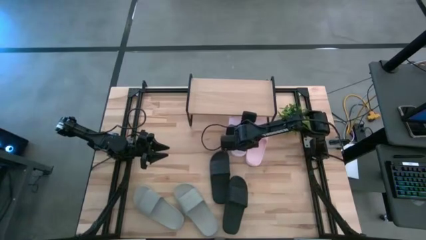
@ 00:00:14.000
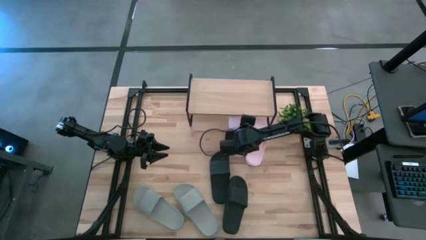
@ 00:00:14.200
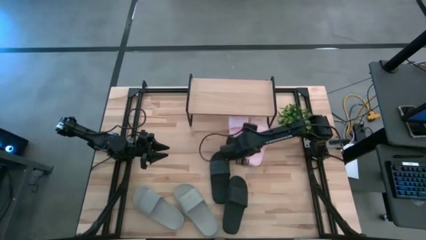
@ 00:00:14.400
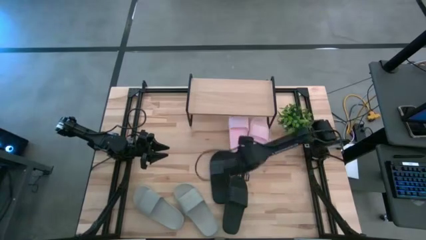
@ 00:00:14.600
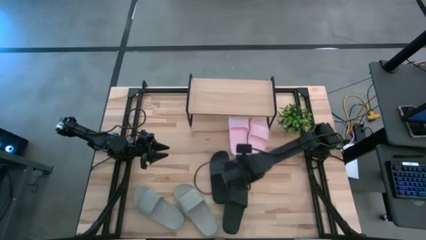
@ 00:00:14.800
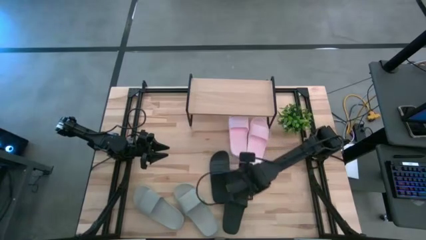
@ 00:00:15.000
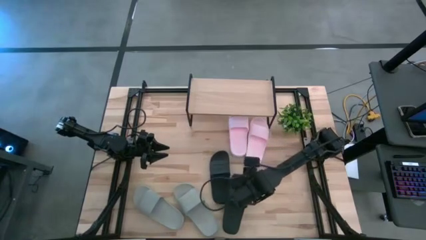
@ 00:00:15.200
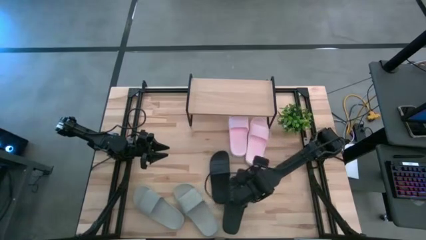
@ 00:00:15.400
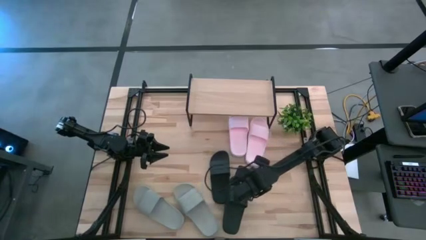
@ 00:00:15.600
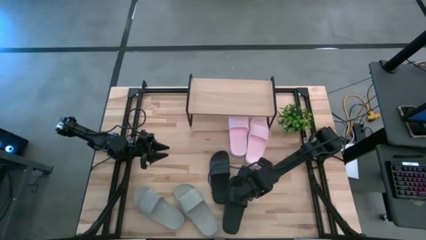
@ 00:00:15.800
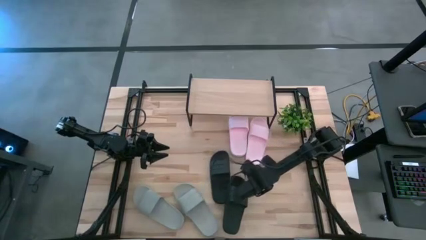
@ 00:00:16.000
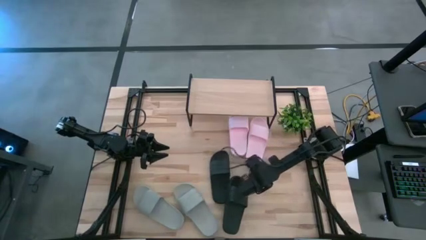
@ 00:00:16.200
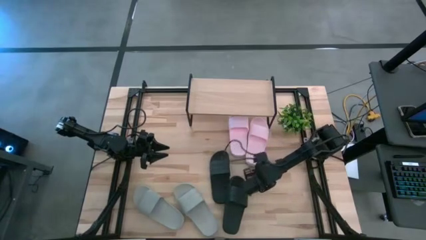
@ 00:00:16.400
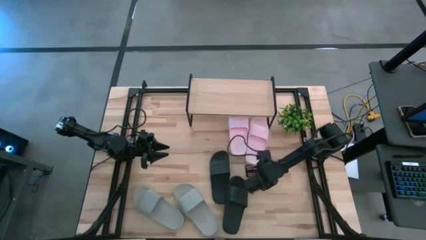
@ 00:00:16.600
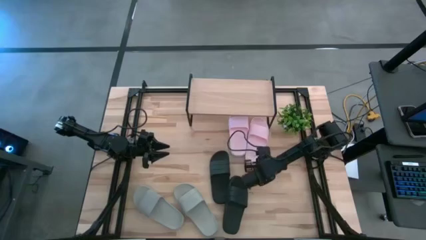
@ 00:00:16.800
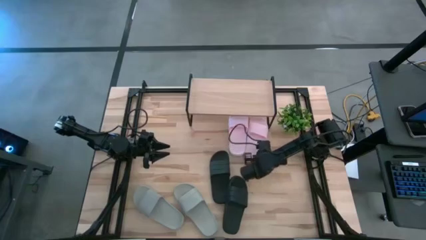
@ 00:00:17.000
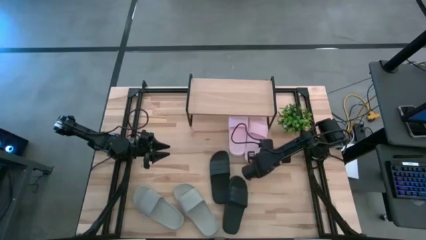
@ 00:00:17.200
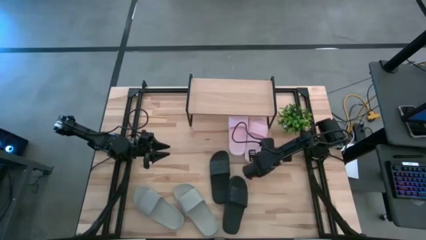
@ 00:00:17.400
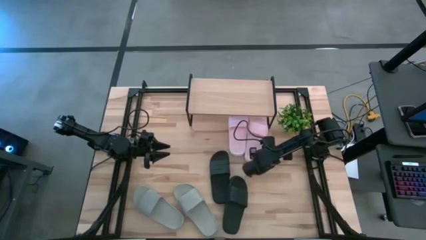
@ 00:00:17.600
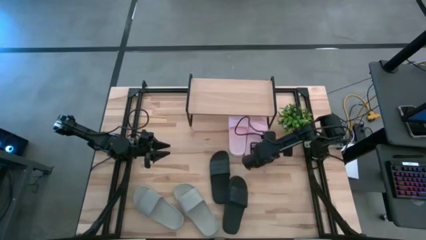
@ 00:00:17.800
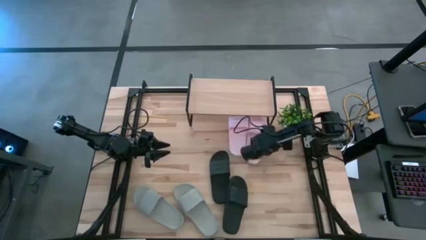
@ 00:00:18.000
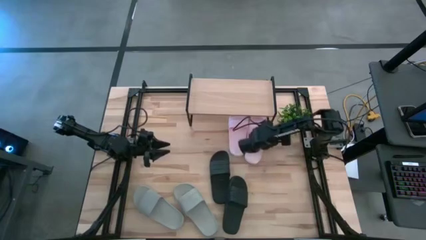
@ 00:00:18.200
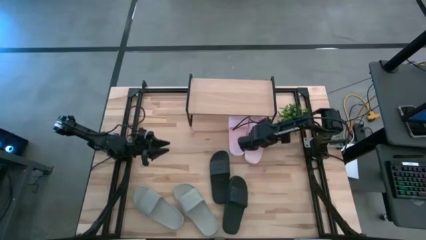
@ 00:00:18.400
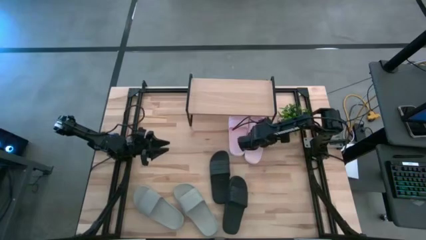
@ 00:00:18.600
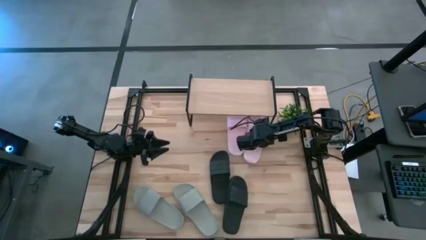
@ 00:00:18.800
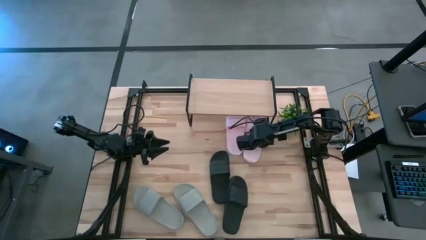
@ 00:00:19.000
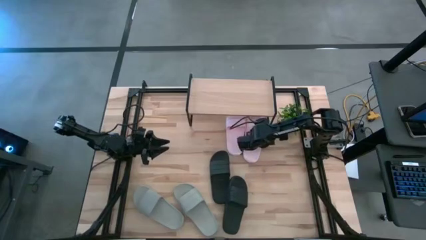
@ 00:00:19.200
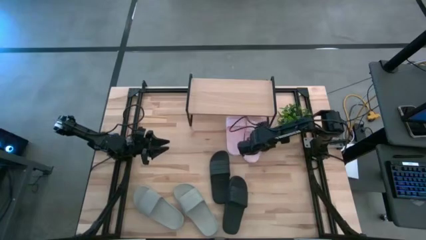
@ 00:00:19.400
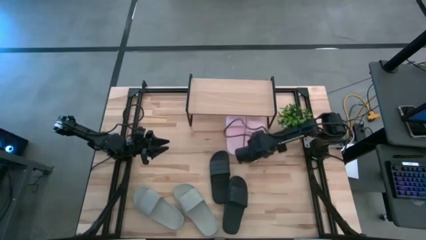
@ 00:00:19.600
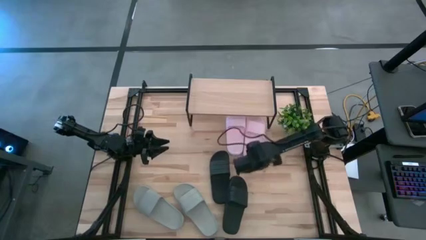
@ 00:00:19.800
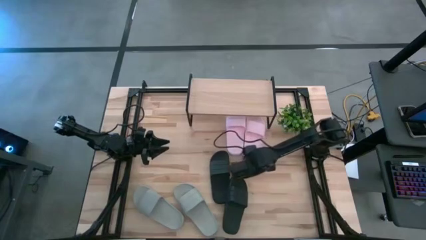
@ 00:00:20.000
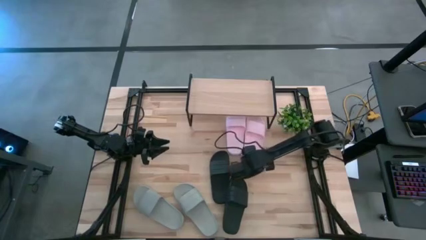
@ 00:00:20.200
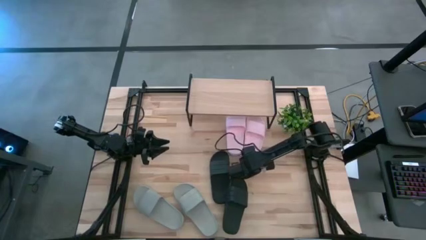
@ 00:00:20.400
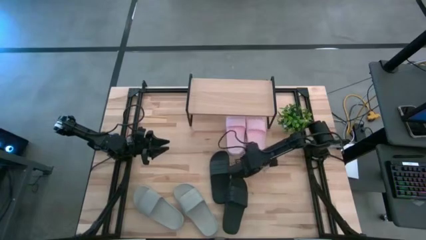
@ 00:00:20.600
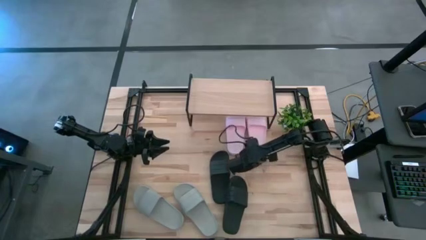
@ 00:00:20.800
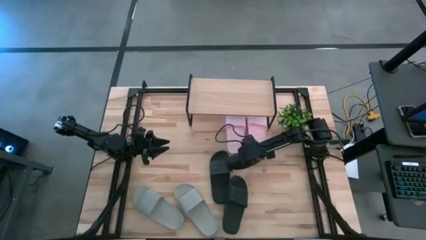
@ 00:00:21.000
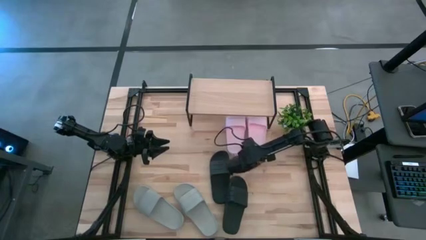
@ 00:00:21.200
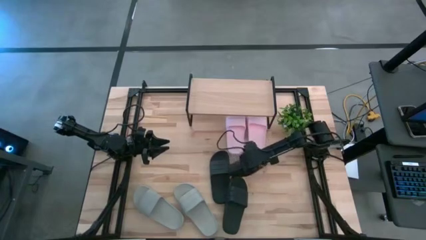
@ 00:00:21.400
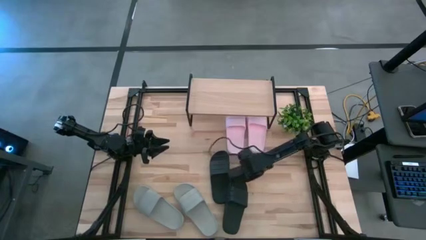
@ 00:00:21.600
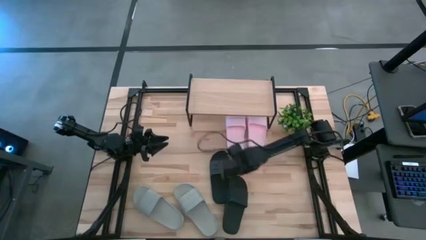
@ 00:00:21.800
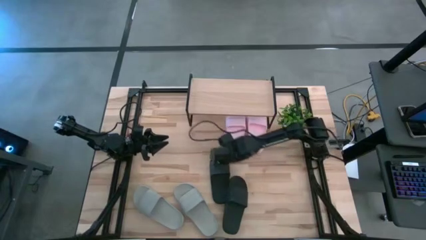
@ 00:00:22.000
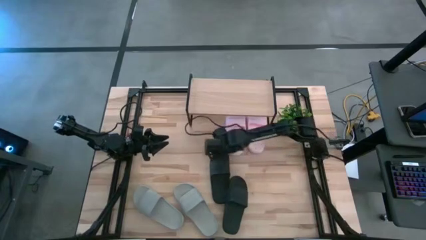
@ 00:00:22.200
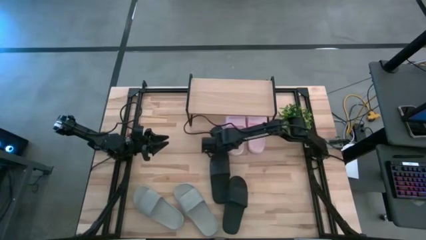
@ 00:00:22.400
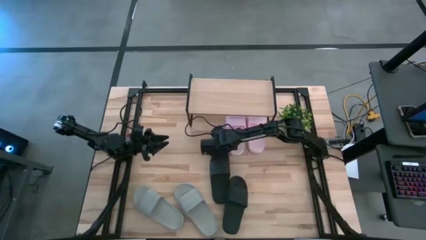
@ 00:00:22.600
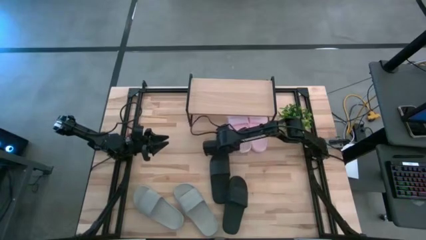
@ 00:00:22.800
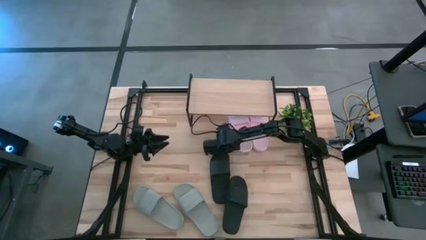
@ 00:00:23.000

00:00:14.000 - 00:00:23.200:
Task: Pick and place slides into the shelf
Adjust the pink slippers under the shelf

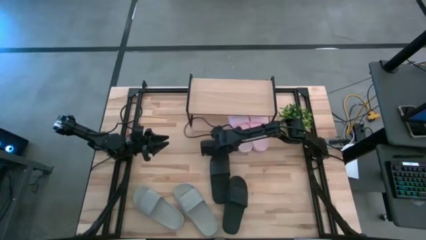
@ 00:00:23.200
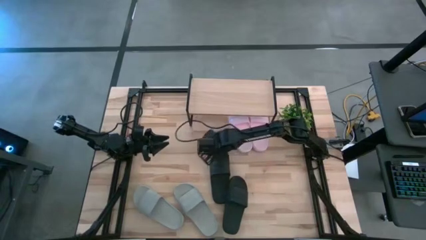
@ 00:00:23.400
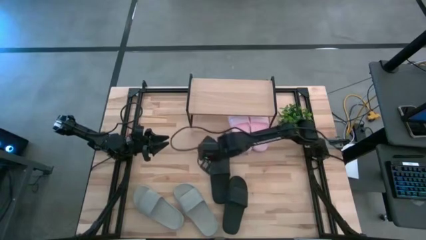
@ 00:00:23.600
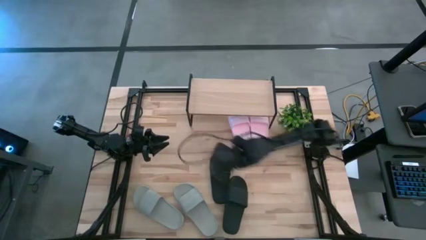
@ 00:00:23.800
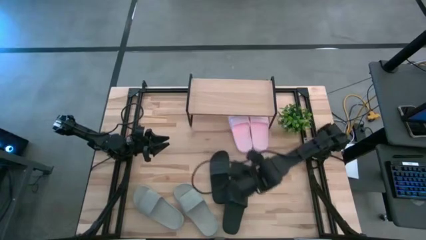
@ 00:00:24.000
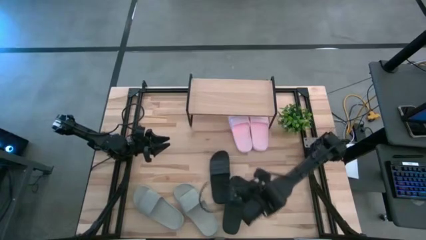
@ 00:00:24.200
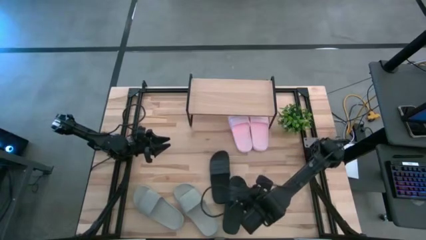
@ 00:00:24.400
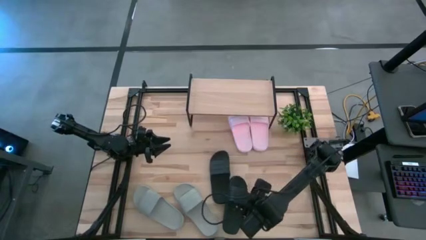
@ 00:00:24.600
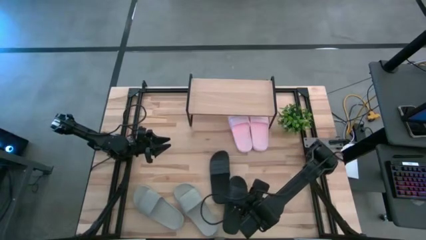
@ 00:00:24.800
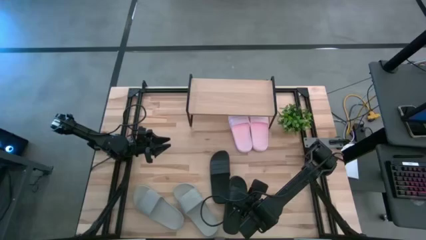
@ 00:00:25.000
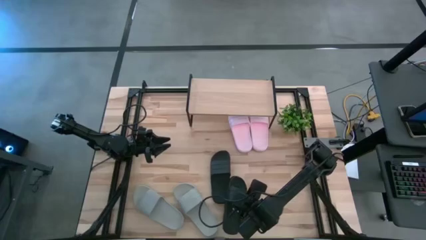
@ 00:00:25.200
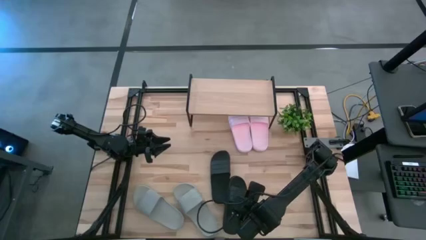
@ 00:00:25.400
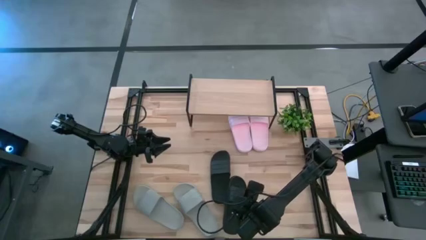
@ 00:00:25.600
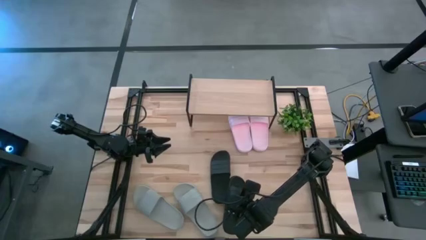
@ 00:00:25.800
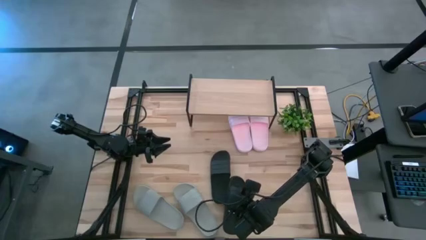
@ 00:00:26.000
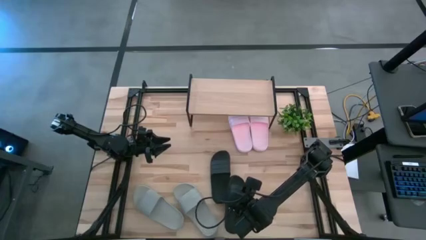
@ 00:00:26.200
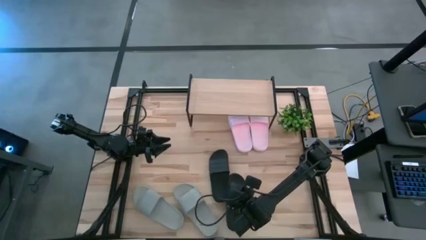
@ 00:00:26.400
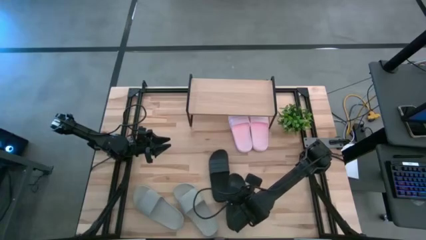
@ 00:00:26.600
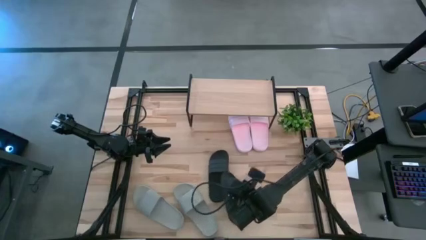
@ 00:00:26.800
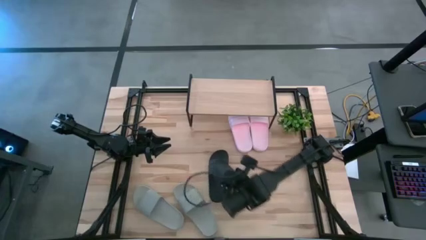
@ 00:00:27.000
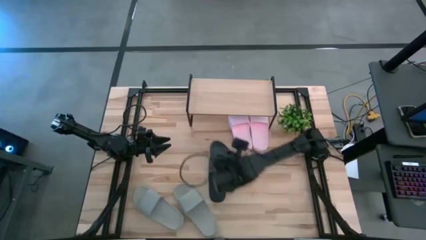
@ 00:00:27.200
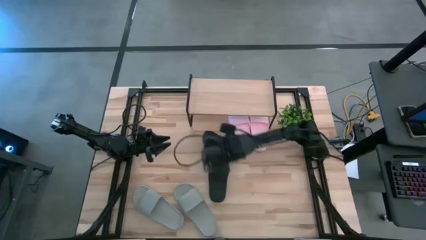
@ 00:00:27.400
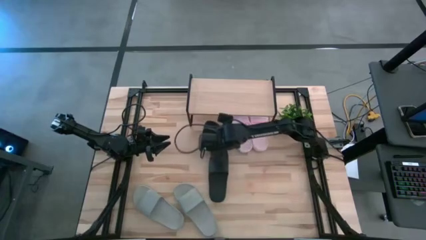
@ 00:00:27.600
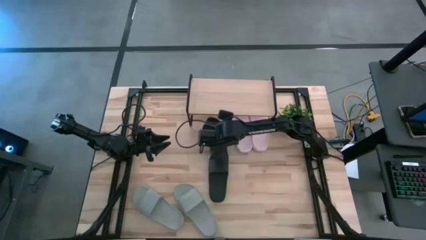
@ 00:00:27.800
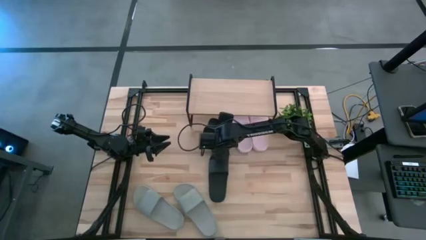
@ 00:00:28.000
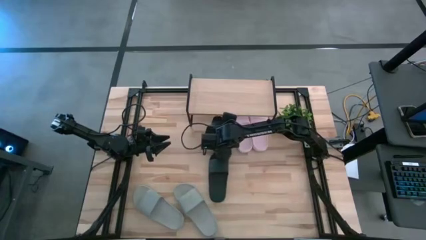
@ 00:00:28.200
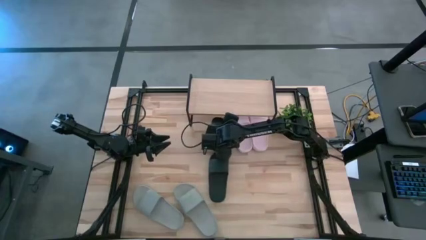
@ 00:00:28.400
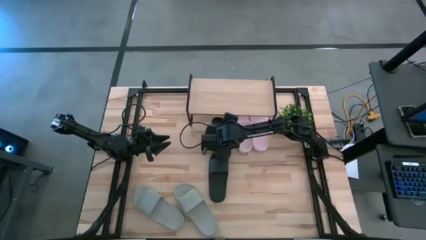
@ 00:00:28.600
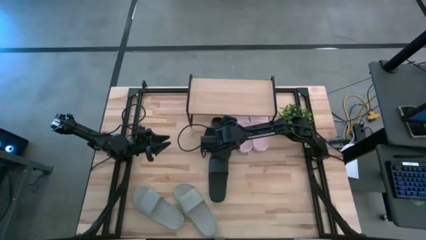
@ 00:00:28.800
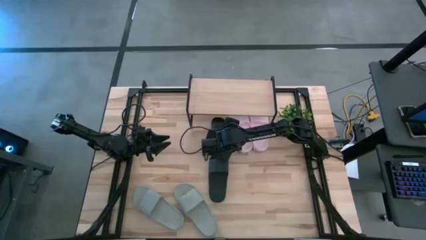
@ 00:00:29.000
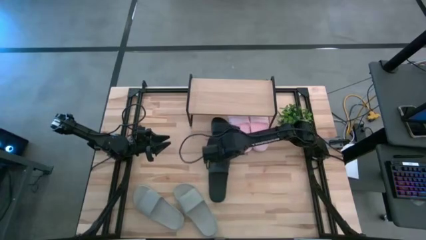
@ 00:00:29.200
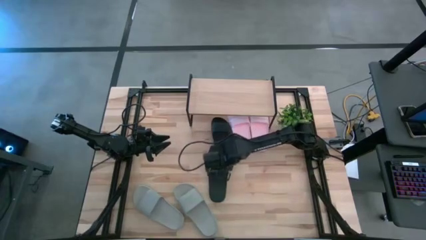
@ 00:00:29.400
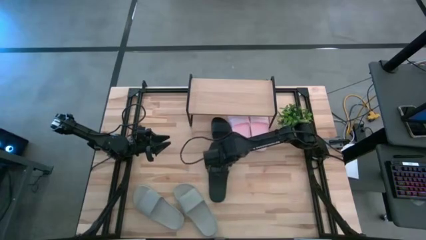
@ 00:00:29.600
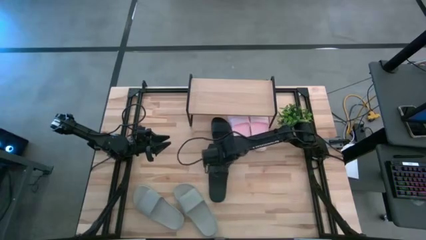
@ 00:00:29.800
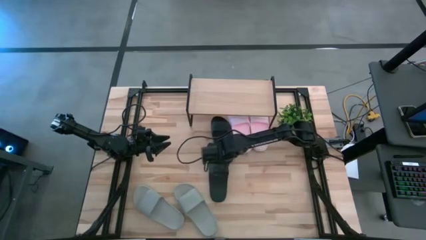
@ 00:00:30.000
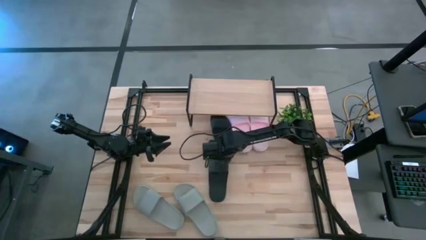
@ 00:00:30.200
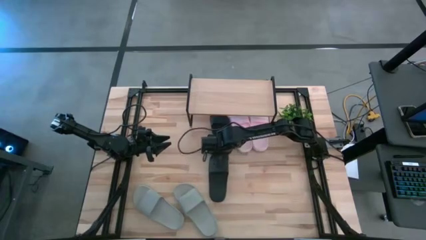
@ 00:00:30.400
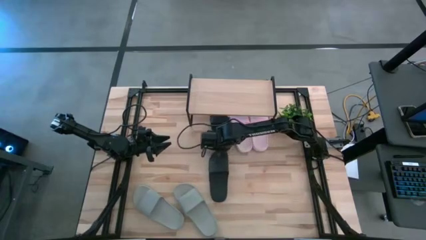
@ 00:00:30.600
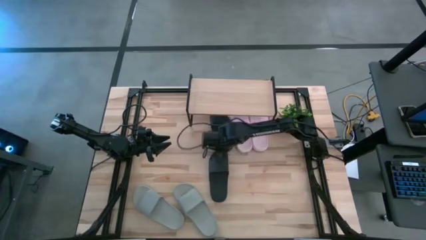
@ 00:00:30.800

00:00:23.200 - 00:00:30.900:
Put the bottom black slipper under the shelf
